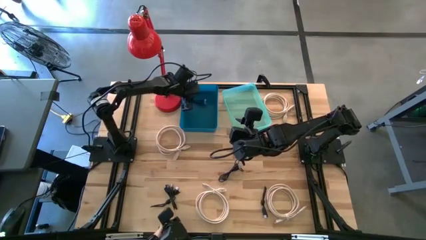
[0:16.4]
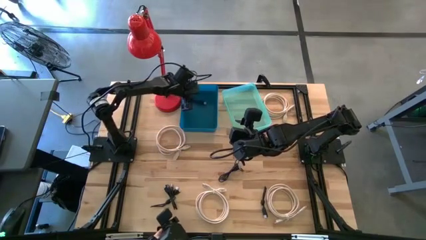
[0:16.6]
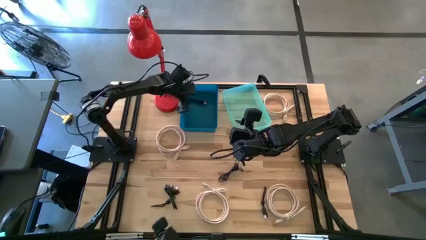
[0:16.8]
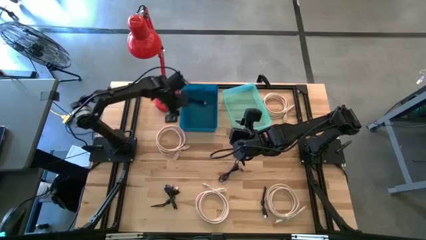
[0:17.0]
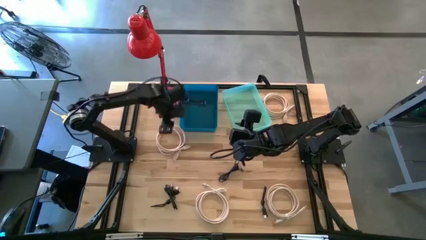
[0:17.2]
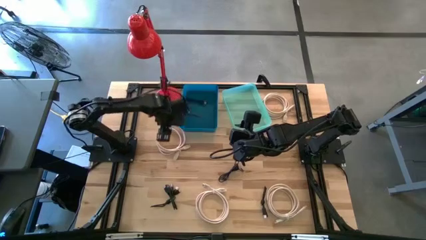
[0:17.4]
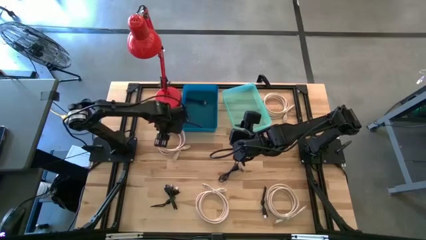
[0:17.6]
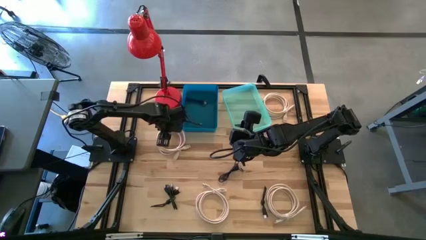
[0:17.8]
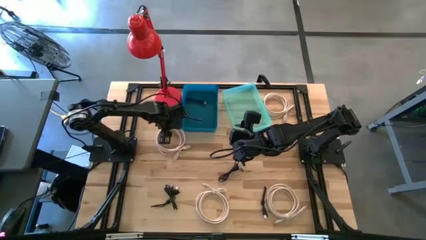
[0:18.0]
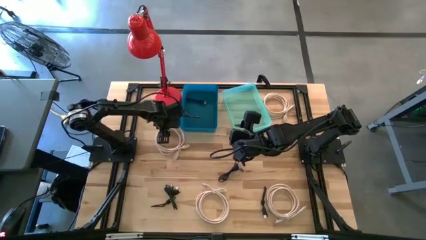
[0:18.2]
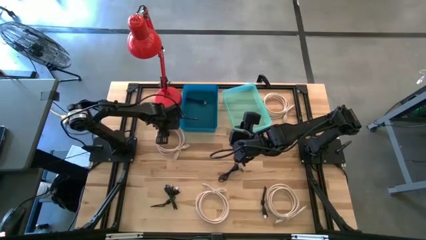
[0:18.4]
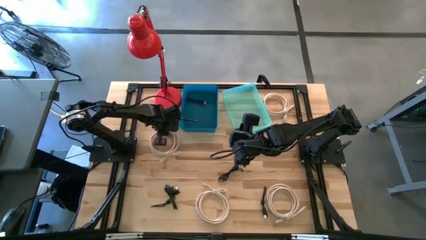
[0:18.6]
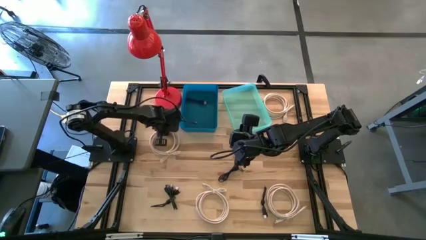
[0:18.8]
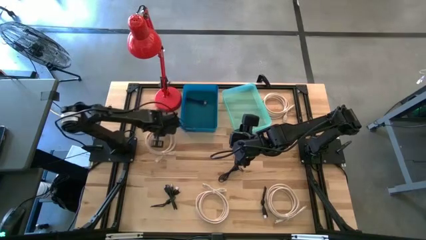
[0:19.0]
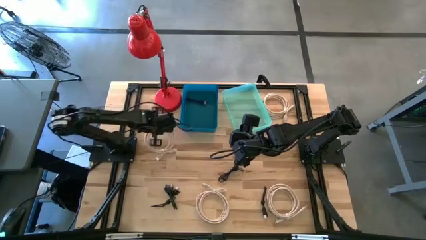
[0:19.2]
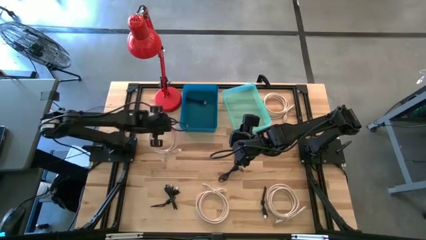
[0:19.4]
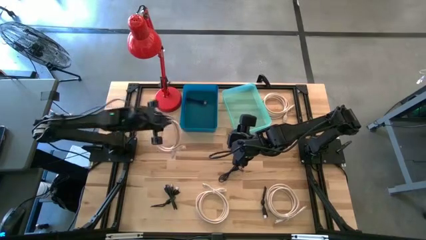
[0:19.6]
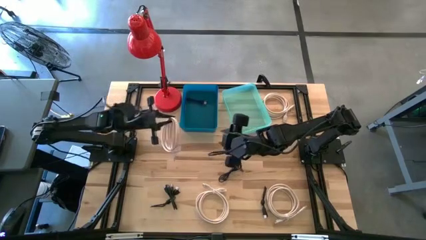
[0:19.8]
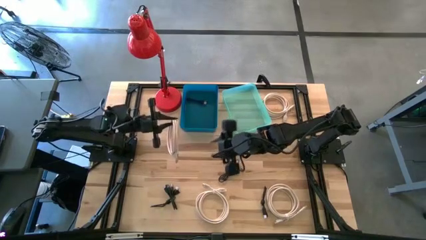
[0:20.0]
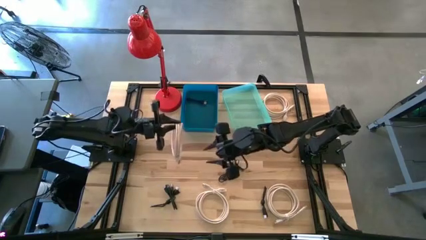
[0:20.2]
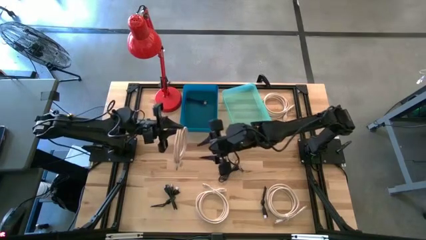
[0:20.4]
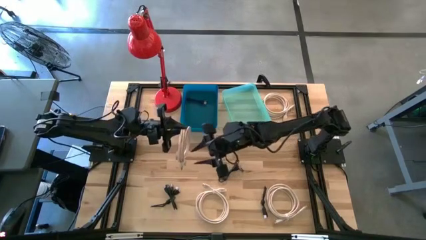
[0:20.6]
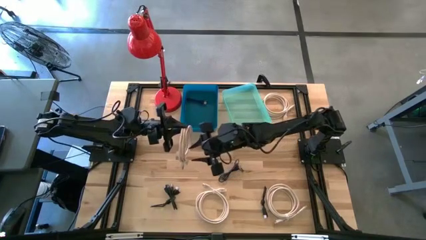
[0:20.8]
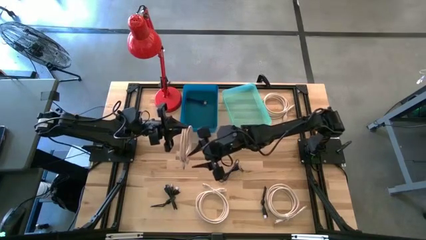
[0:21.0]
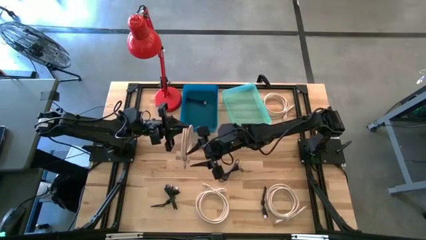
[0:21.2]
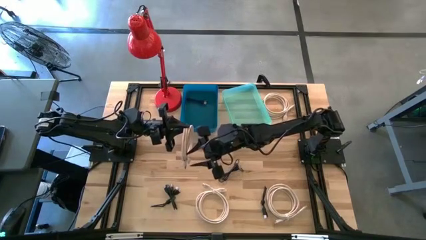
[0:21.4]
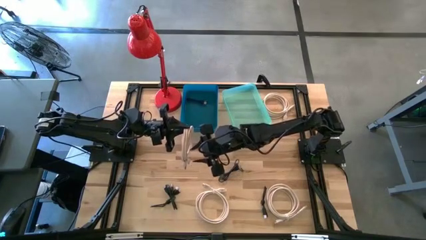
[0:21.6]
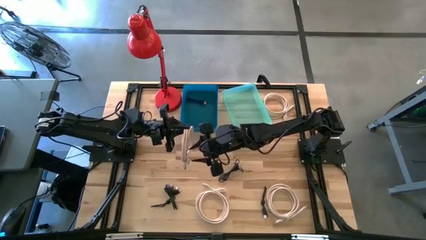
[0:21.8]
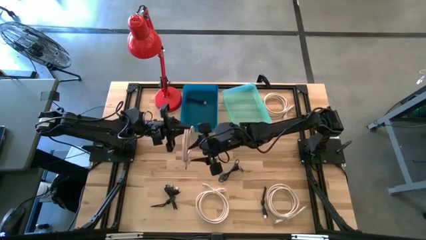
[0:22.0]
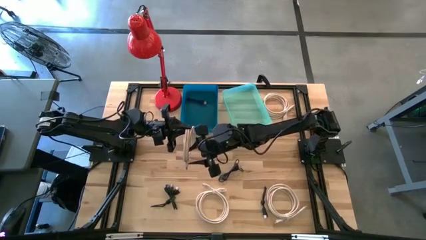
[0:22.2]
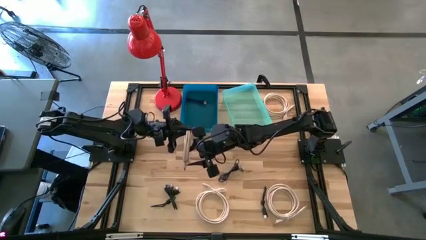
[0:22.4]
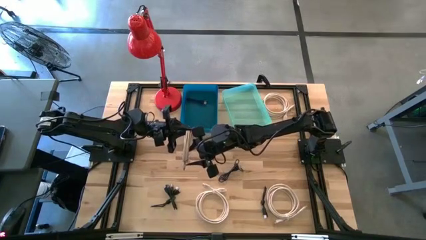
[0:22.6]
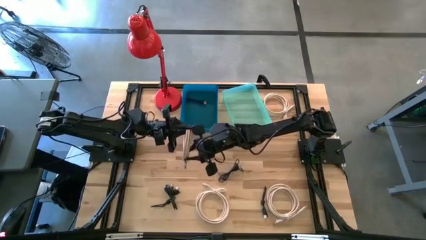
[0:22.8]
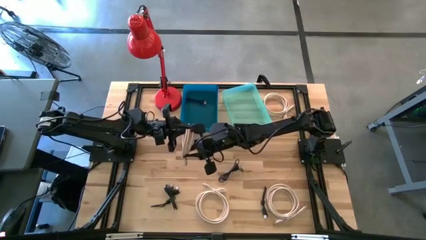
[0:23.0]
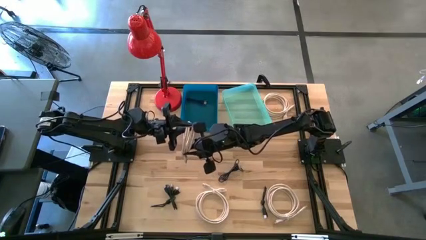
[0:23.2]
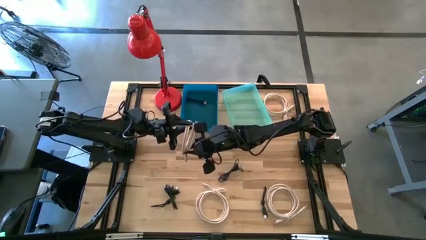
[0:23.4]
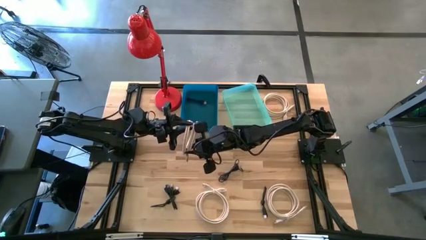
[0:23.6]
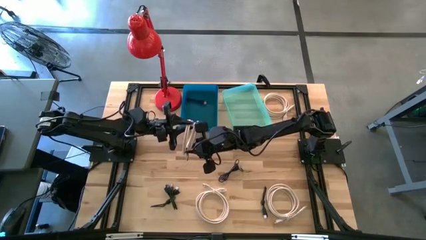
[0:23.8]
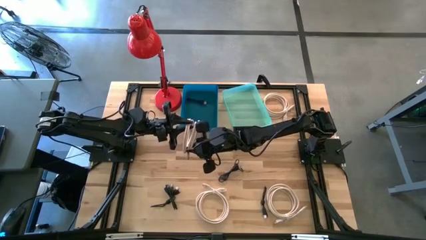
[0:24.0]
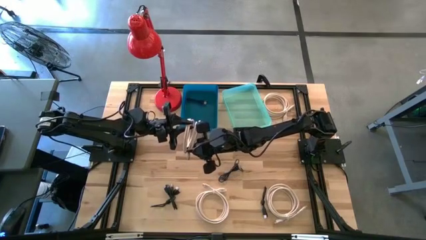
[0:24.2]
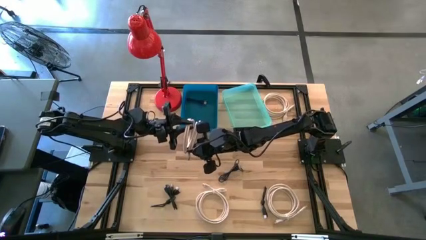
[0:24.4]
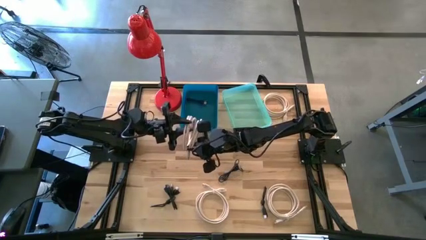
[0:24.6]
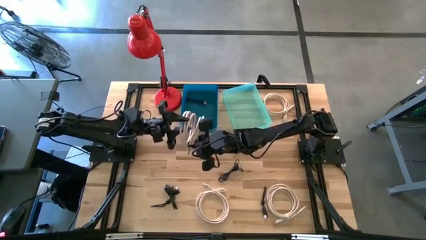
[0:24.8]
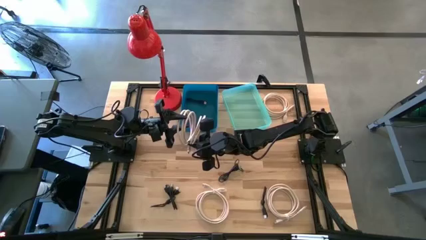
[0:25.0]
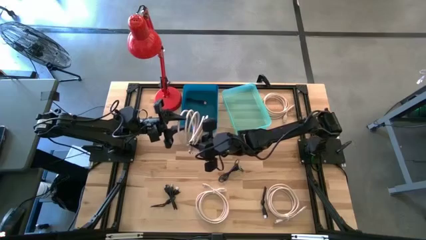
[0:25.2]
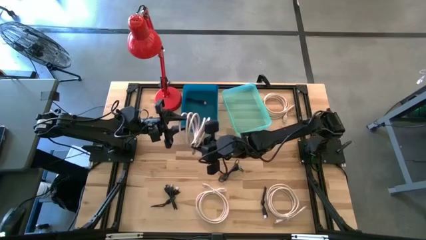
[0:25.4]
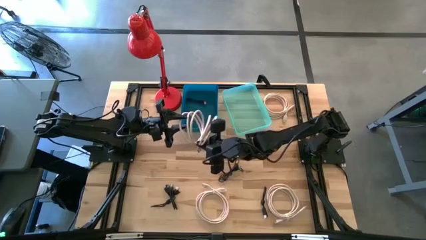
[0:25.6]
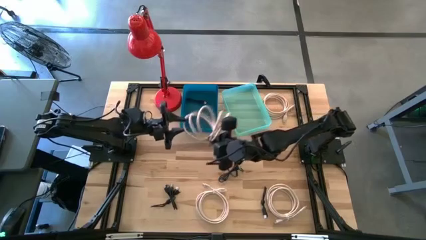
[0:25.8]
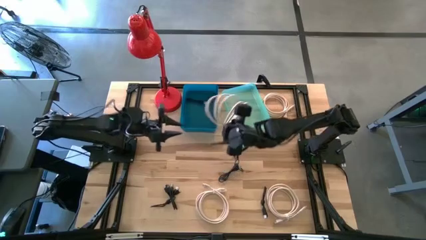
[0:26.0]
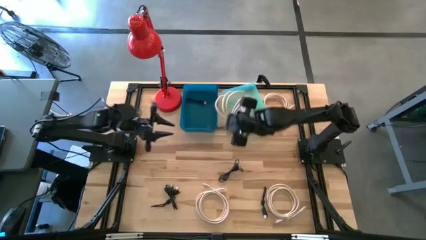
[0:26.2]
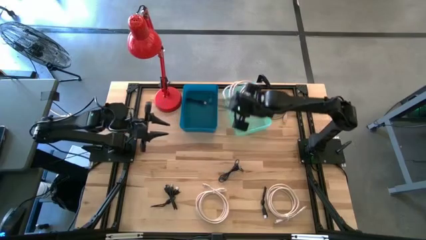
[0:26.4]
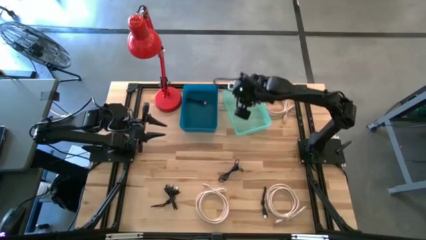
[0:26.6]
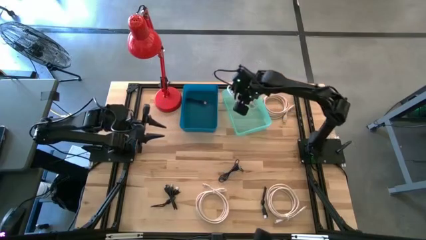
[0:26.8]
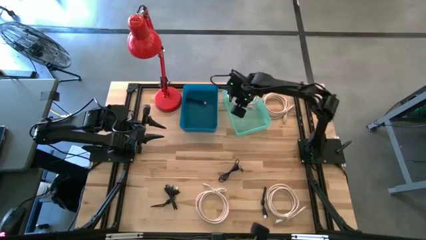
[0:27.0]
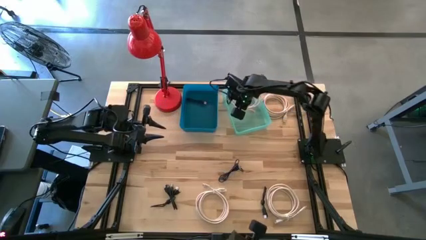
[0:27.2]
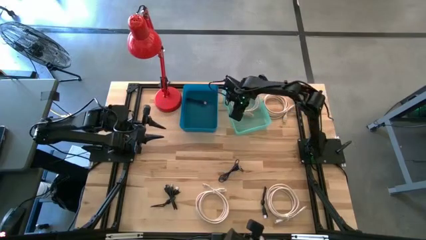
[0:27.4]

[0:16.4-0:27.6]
Task: Pick & Place USB Port
Put the brown HDMI cable into the green bin

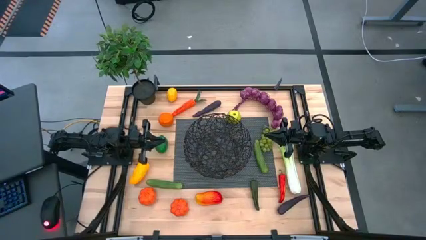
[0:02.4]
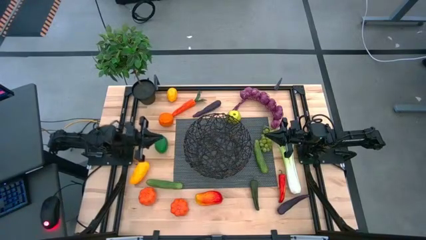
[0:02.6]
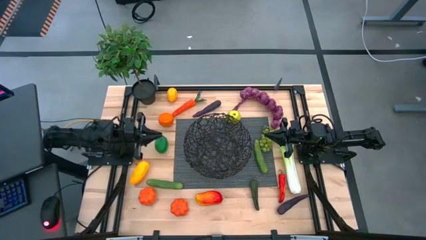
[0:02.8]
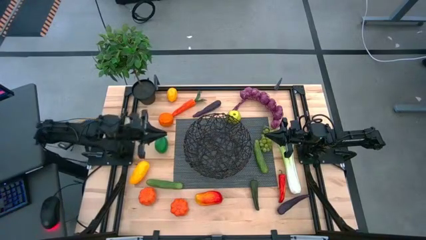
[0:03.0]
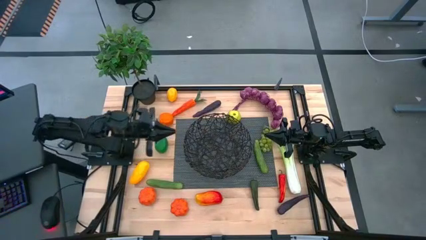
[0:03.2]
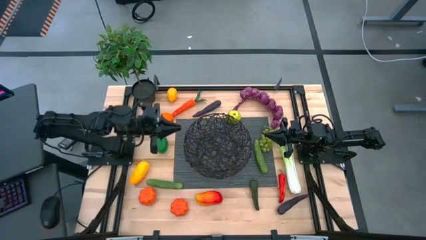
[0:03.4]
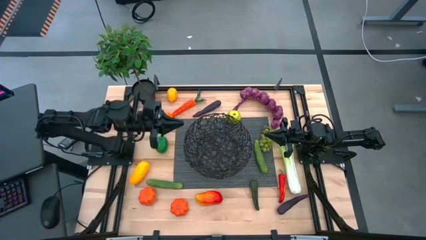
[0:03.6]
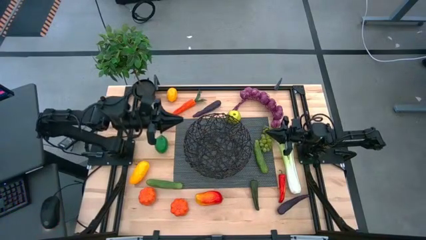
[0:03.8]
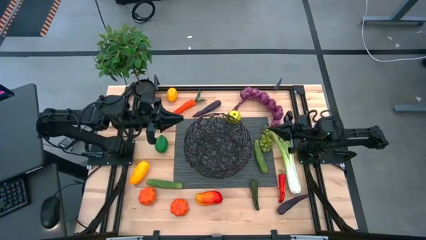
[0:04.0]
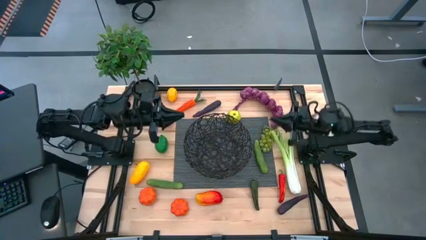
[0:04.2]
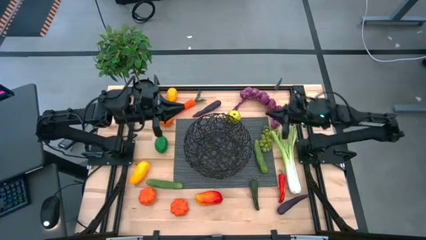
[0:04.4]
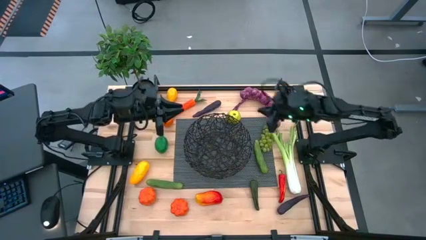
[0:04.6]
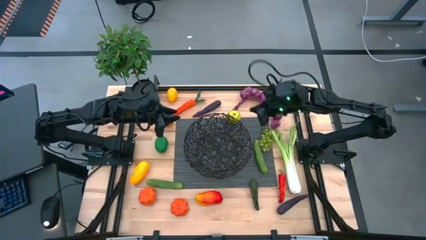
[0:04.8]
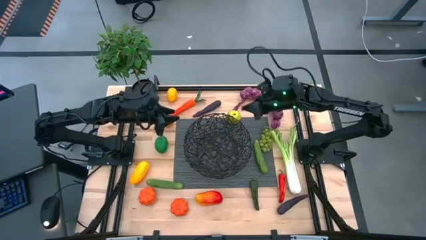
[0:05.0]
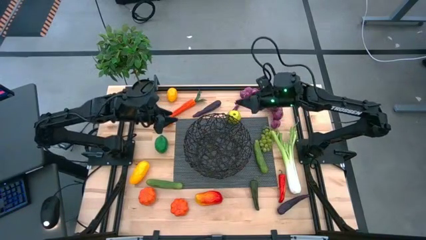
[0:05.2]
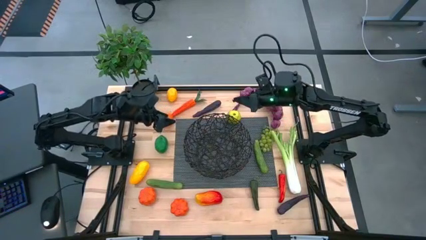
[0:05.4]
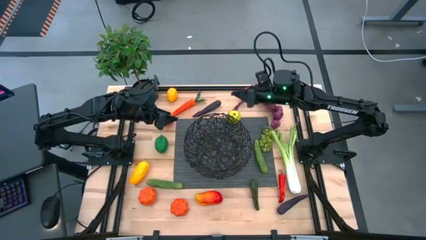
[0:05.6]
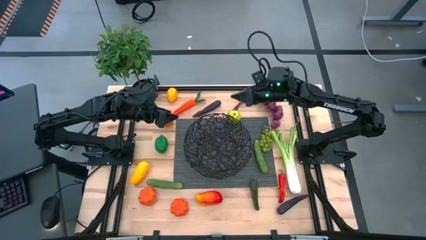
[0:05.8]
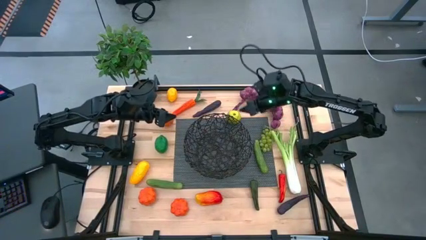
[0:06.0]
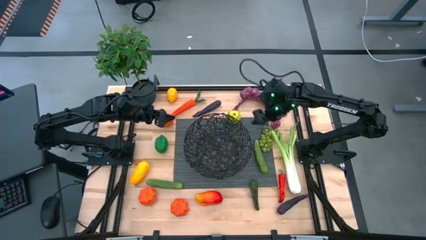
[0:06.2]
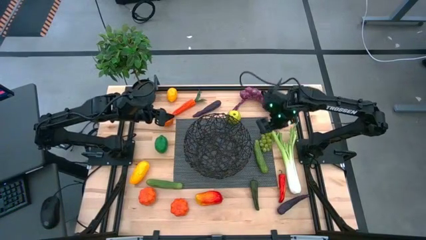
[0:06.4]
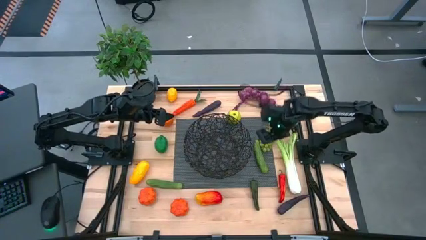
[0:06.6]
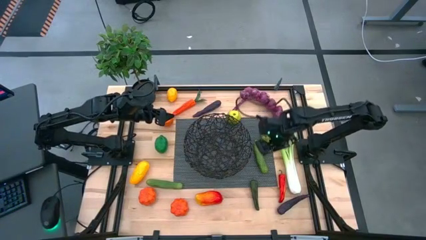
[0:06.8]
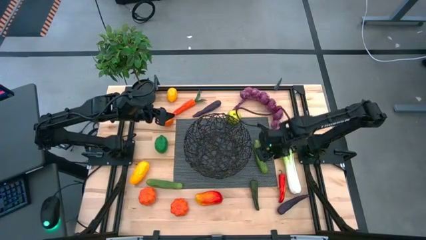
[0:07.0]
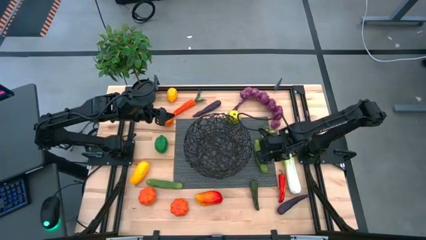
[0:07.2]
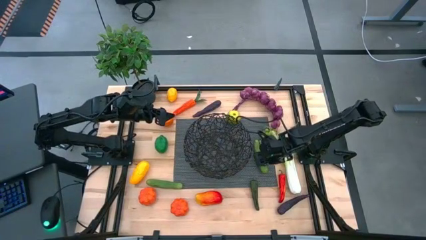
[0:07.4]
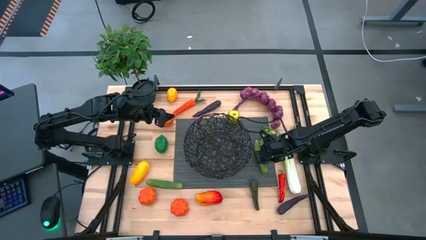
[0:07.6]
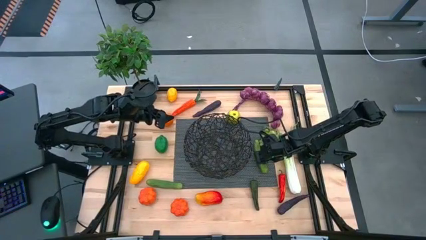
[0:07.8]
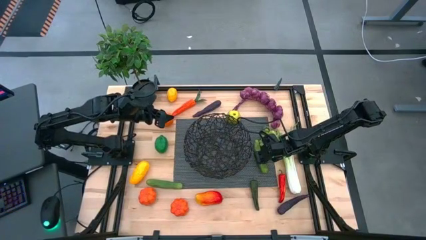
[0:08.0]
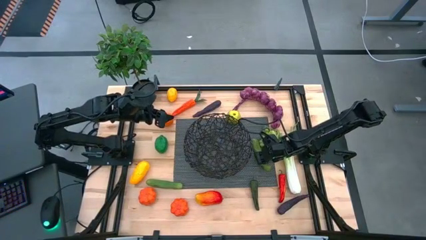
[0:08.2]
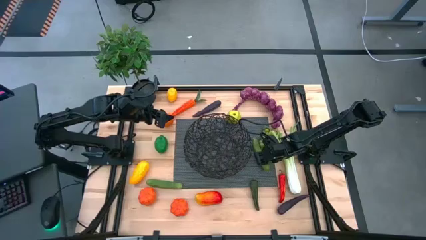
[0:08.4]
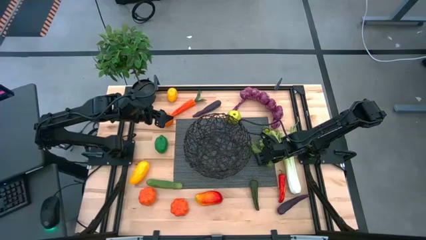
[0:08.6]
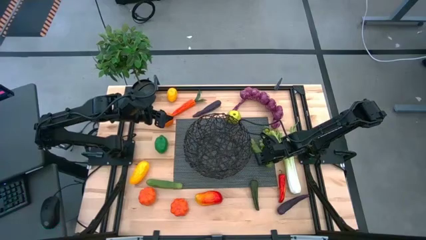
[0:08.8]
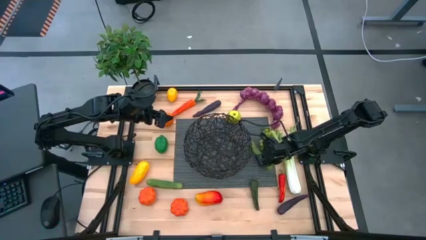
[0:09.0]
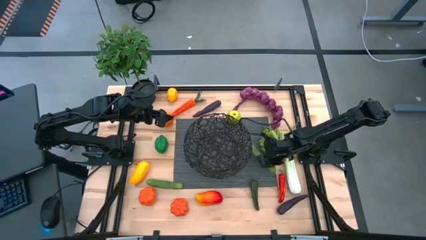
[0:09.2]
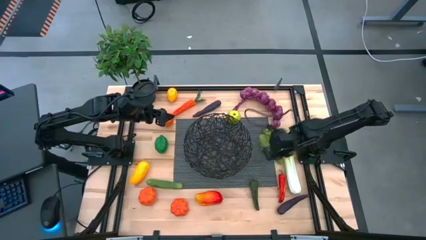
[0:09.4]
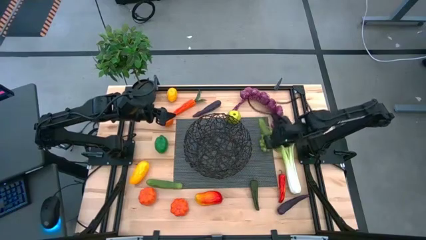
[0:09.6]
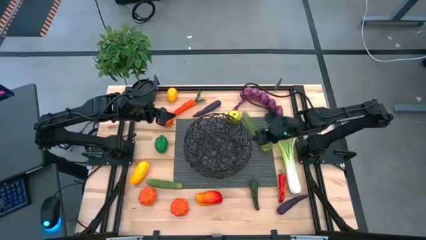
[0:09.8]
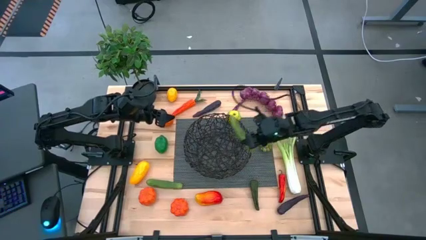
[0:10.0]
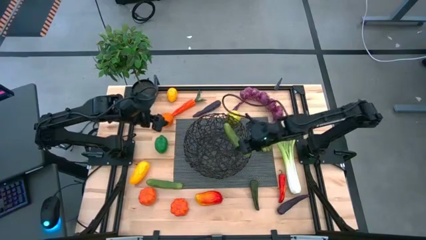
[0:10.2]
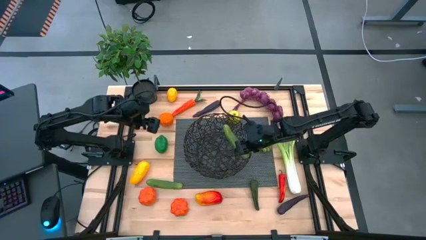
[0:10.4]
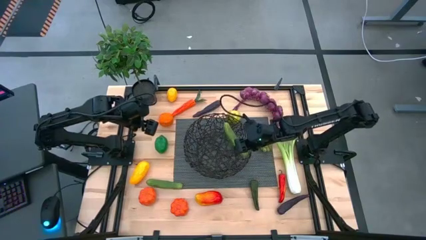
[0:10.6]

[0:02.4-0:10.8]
Task: Build produce basket
Put the right cucumber into the black basket
